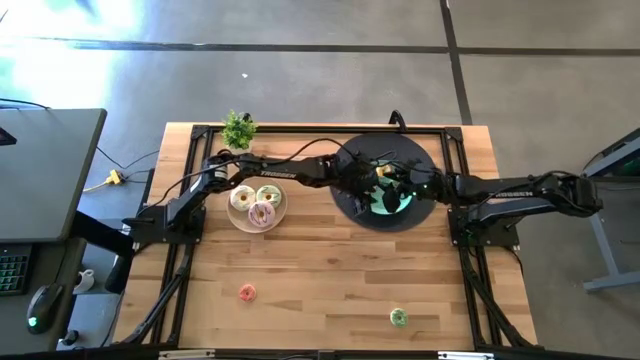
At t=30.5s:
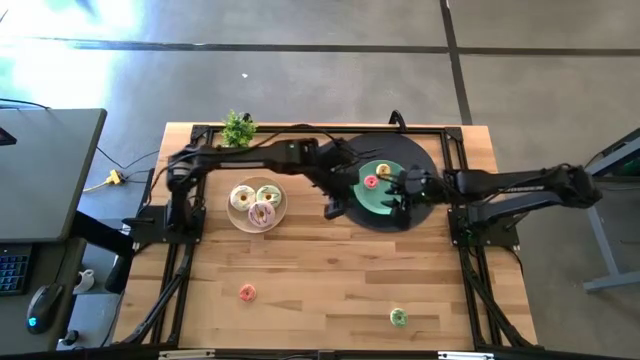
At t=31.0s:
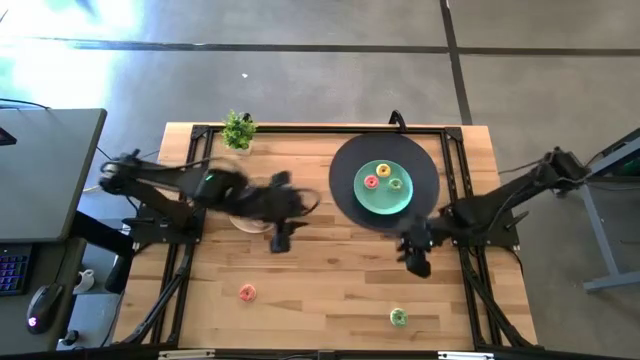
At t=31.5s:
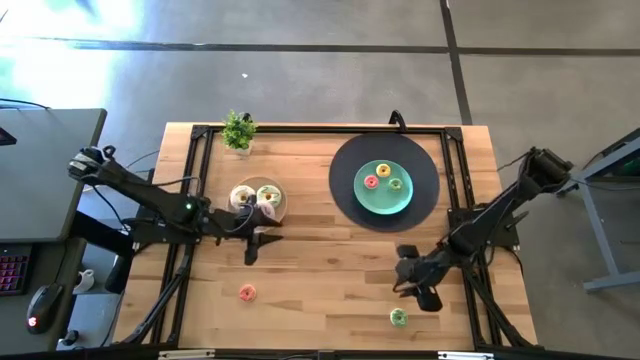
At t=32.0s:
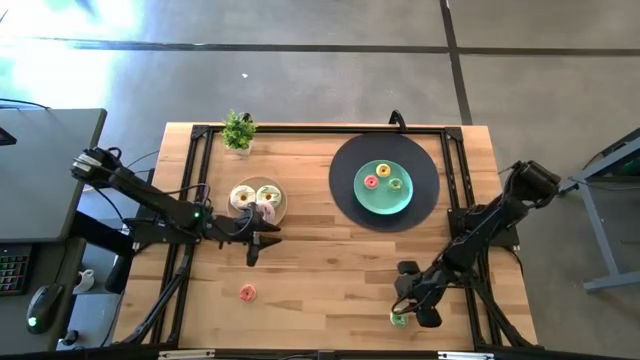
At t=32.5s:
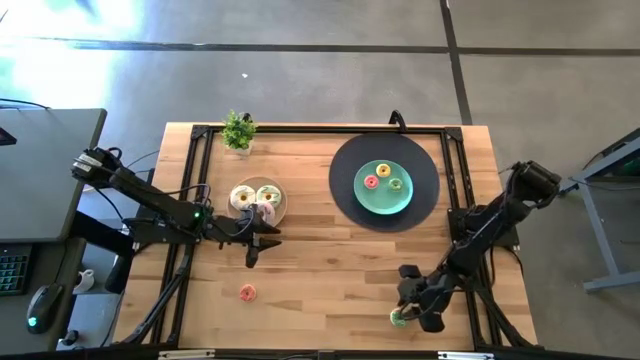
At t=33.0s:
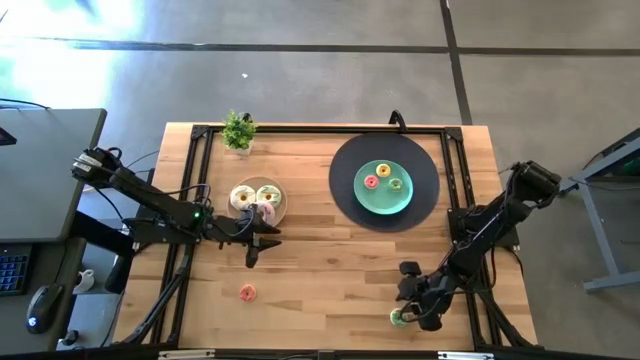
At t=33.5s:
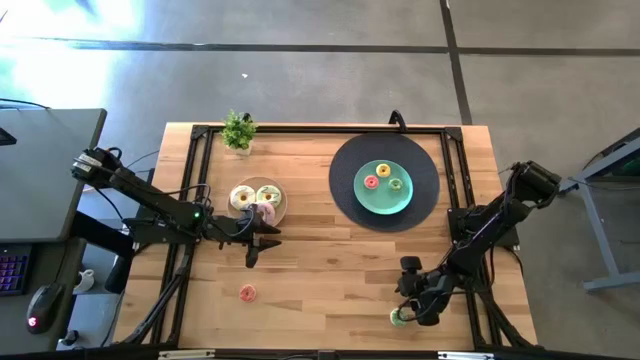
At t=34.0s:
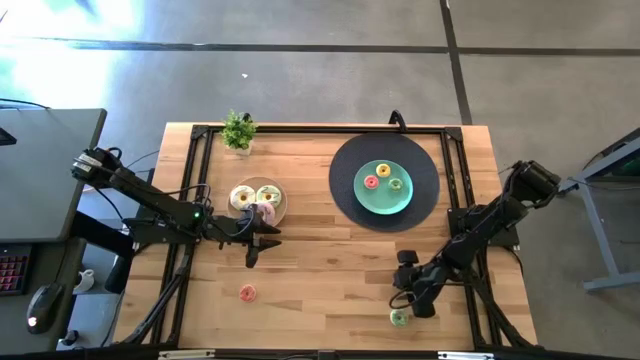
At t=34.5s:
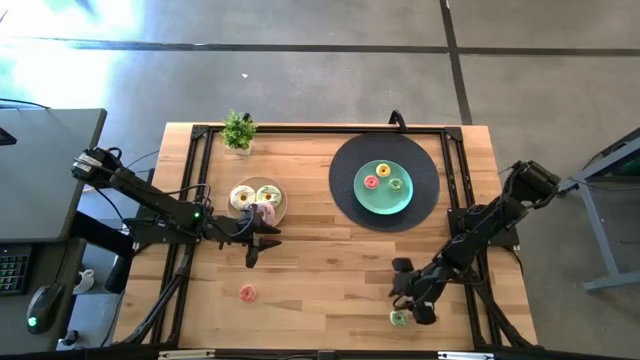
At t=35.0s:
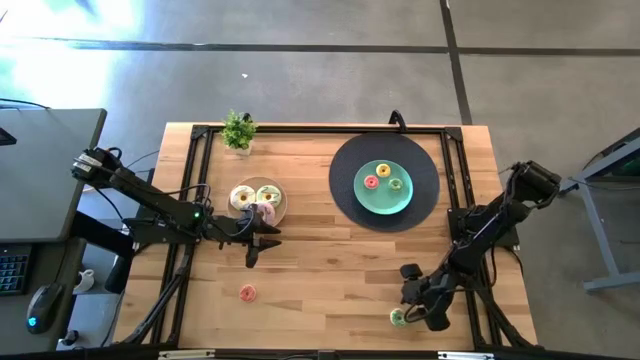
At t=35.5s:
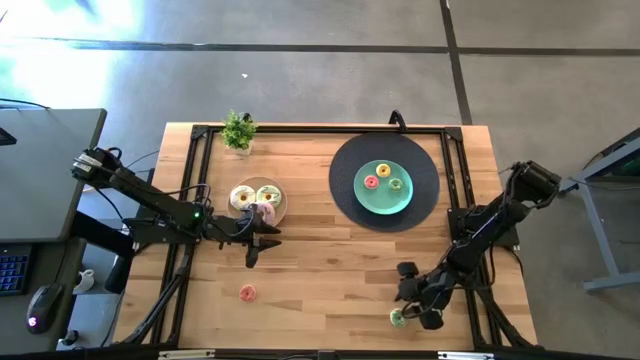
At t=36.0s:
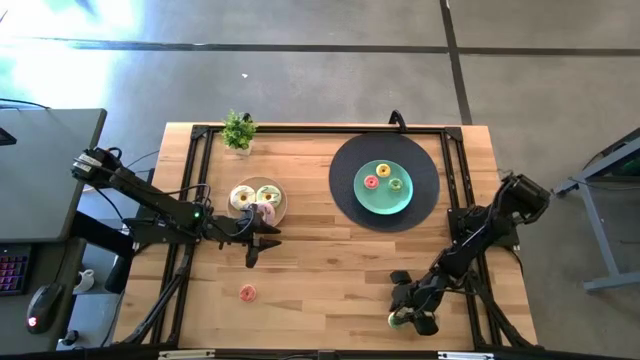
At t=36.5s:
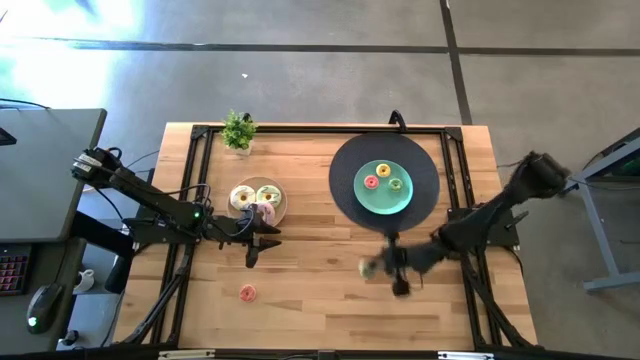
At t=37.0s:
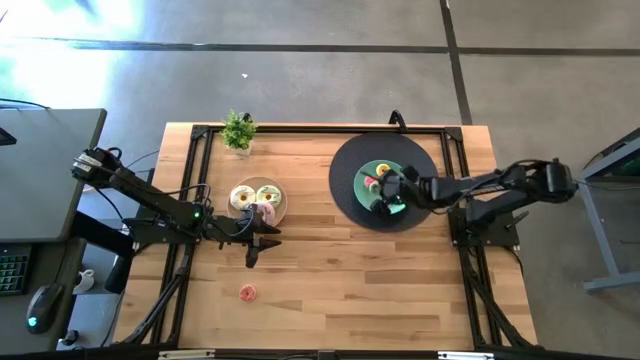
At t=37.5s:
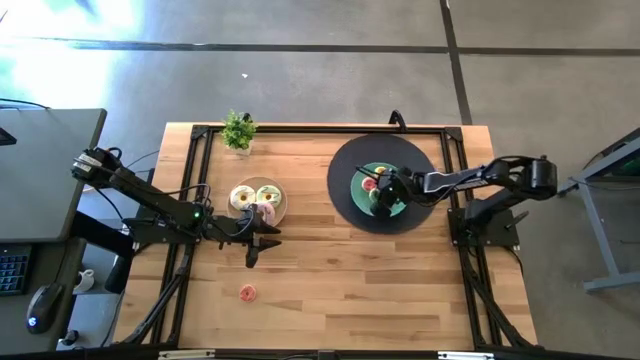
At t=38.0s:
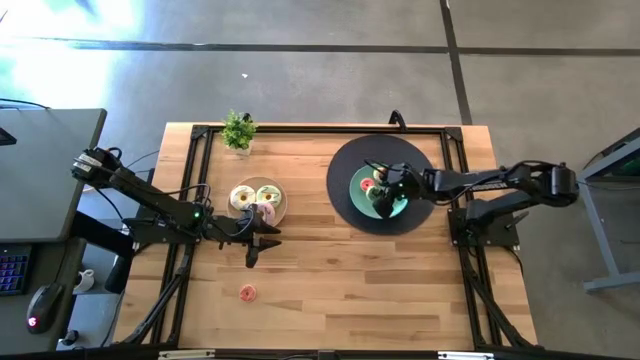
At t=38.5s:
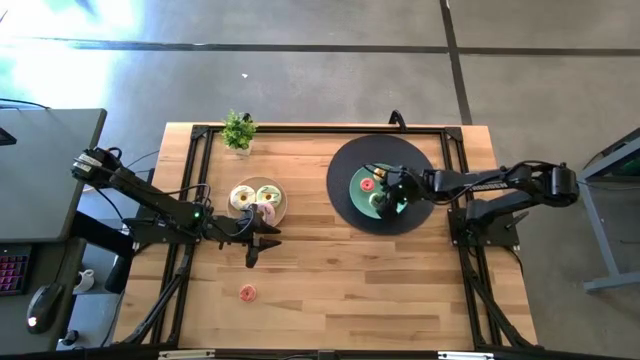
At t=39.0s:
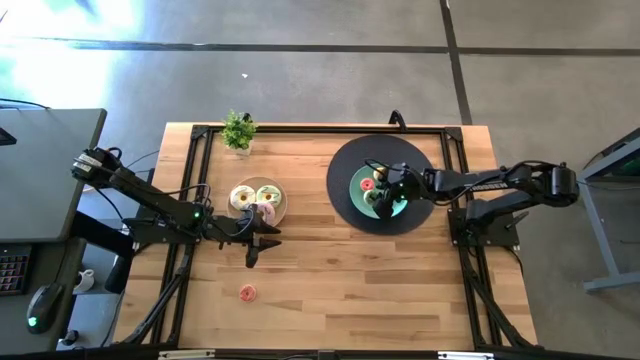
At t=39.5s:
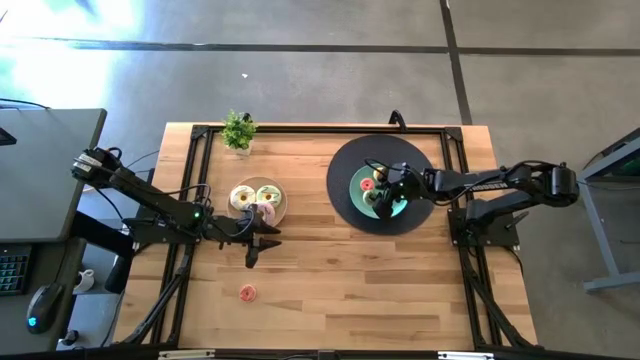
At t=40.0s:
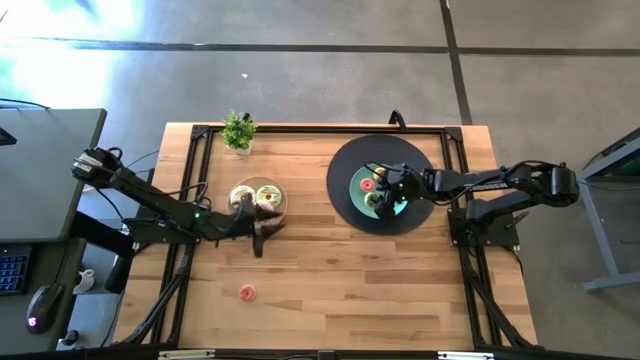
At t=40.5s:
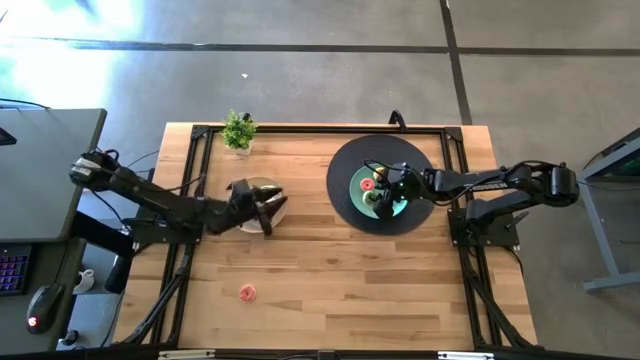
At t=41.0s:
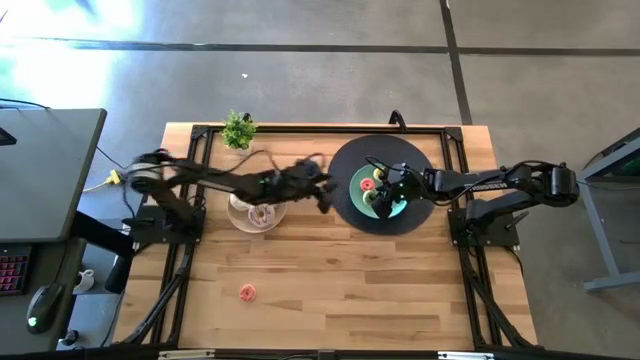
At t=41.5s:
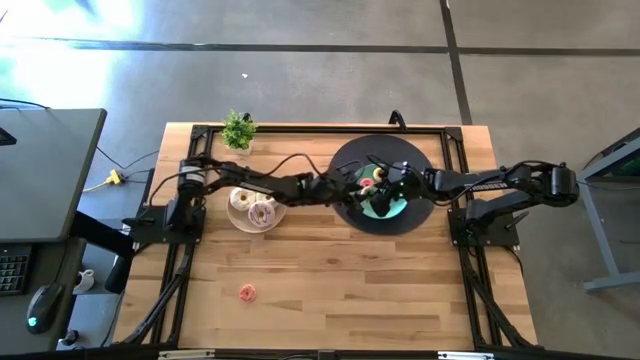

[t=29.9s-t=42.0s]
Task: Pick & Place donuts
Put the small green donut on the blue plate

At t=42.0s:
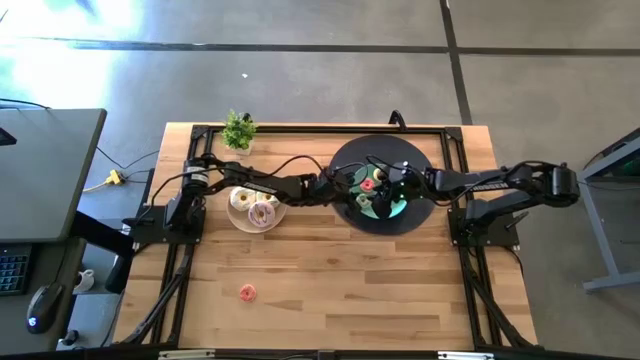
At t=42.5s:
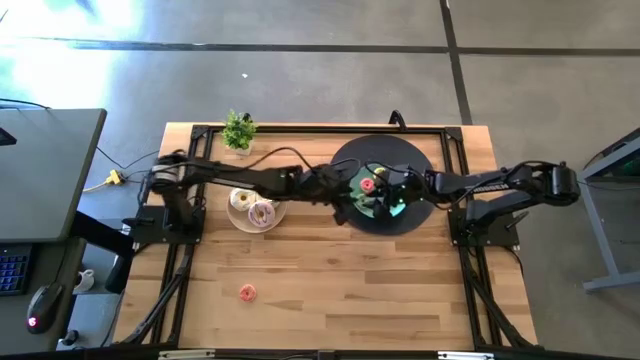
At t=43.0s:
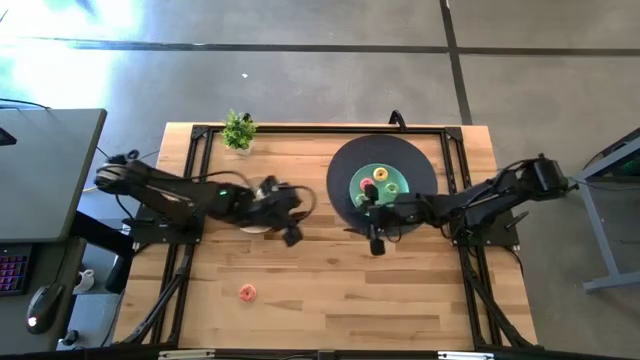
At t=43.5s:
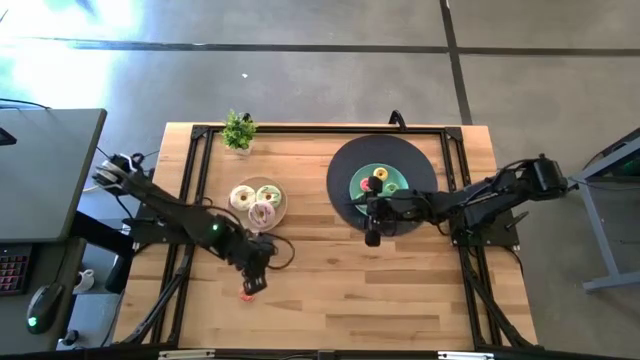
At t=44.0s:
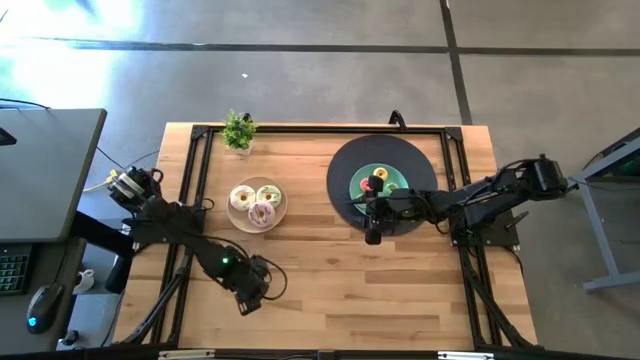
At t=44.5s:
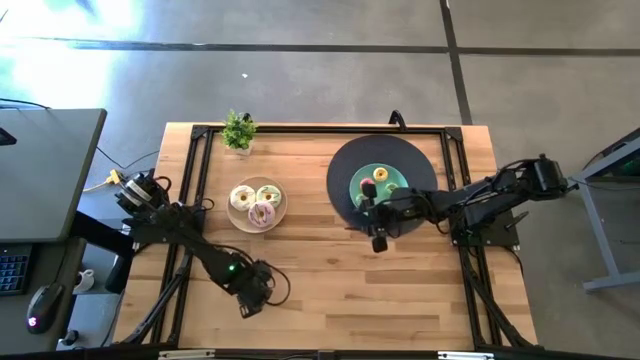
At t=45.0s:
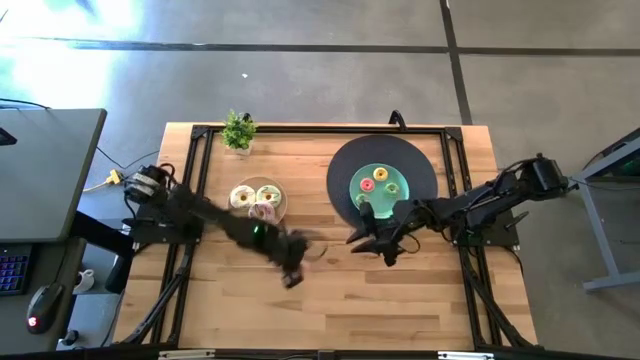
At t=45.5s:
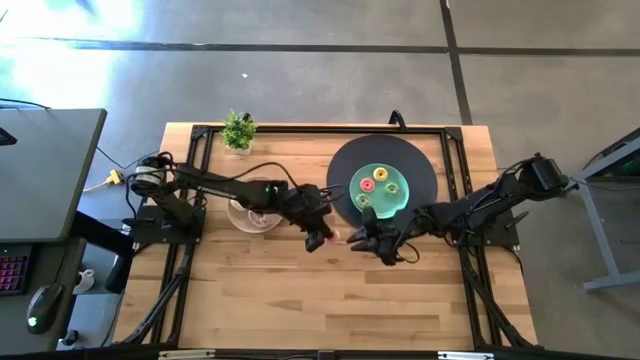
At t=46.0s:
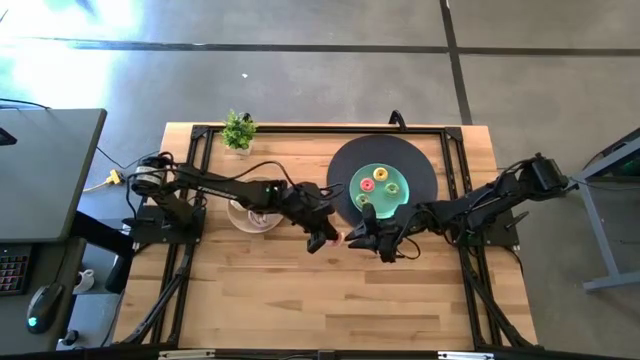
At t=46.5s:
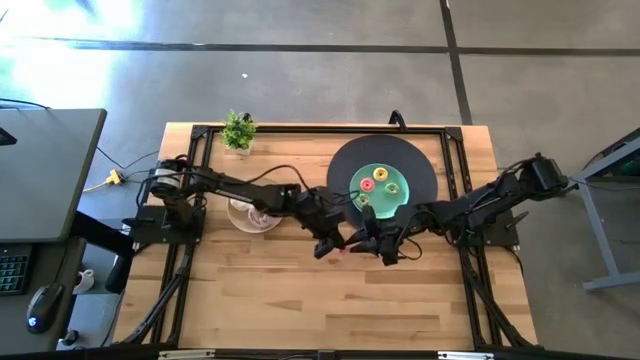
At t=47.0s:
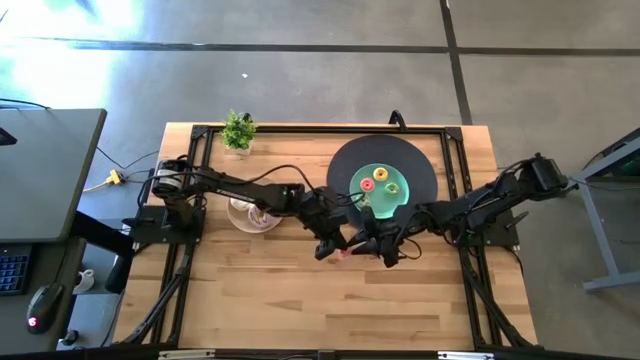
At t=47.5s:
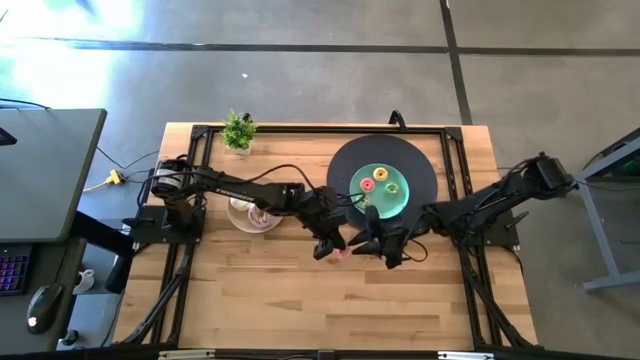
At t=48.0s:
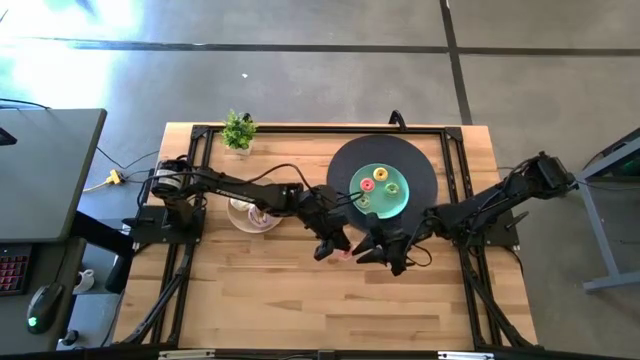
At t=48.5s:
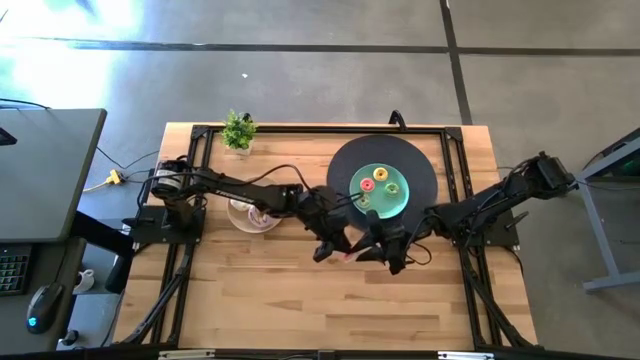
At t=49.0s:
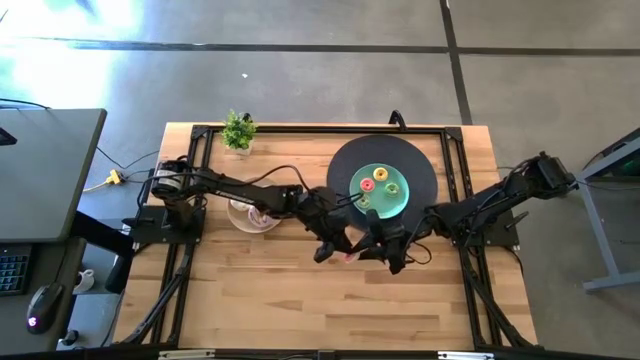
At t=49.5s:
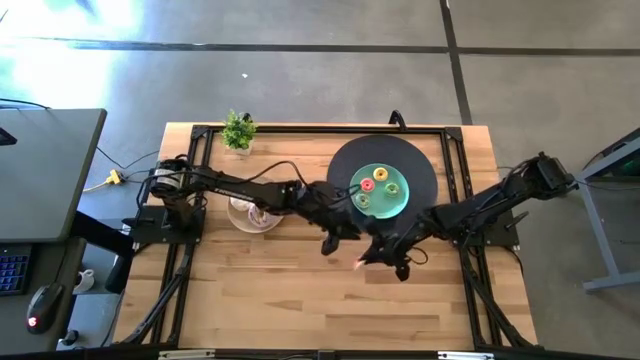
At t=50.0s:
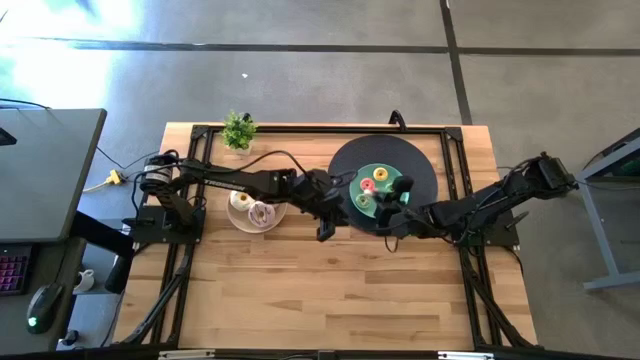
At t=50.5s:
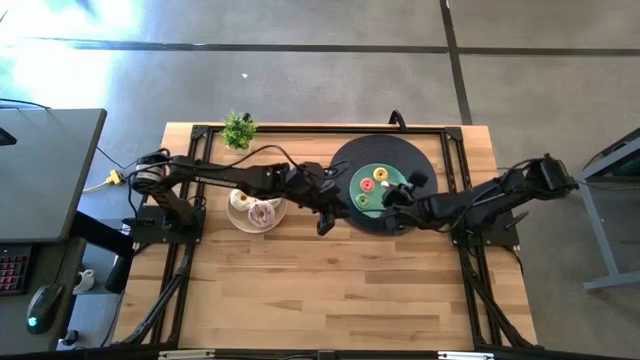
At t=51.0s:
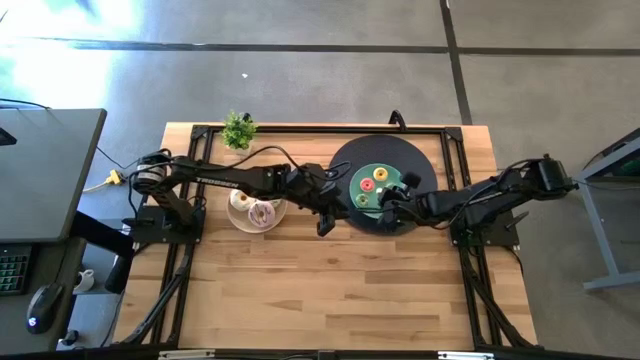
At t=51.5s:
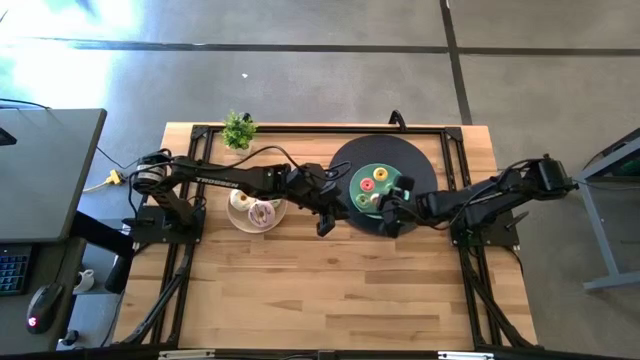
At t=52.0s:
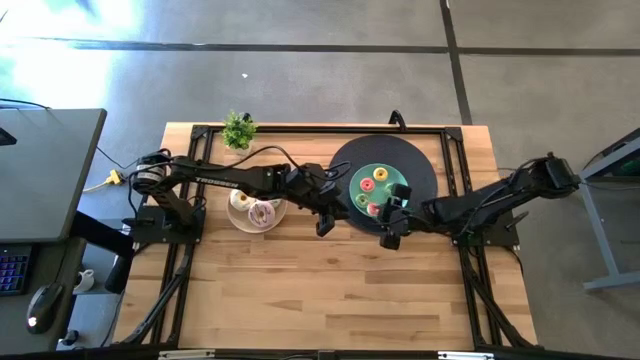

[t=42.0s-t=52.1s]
Put the small pink donut on the blue plate
